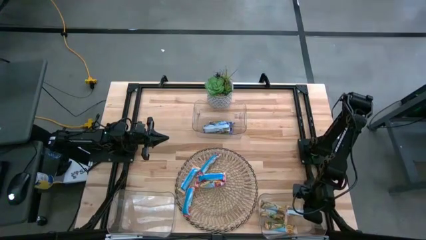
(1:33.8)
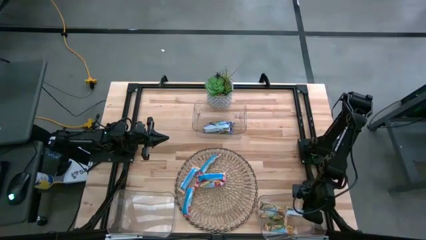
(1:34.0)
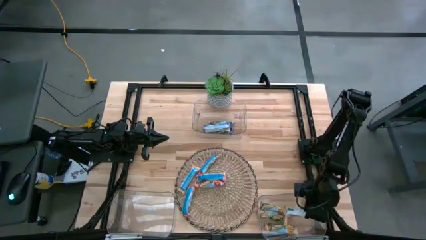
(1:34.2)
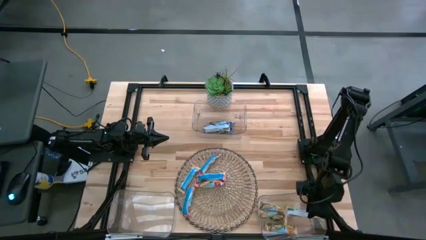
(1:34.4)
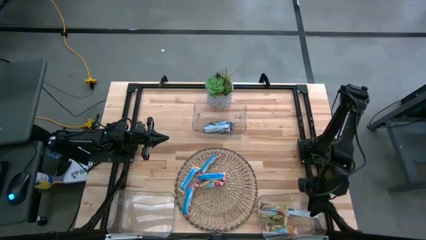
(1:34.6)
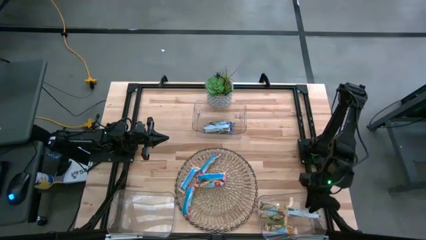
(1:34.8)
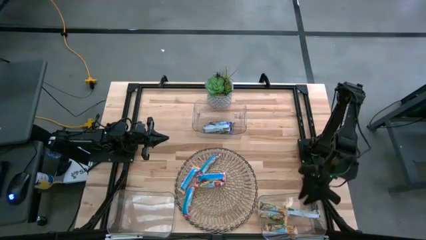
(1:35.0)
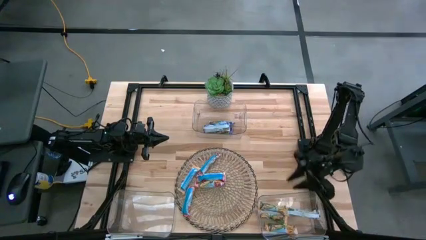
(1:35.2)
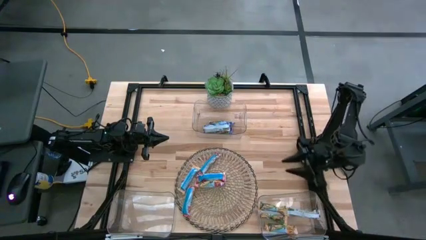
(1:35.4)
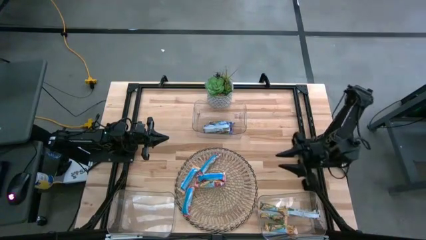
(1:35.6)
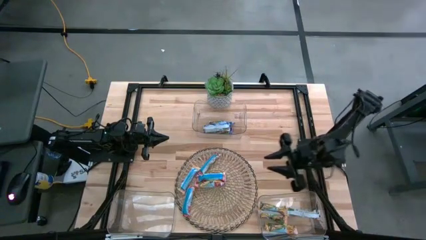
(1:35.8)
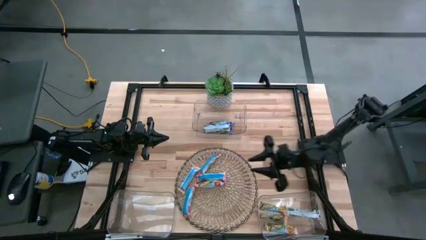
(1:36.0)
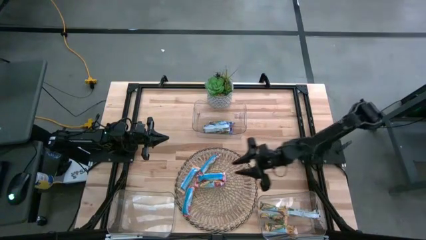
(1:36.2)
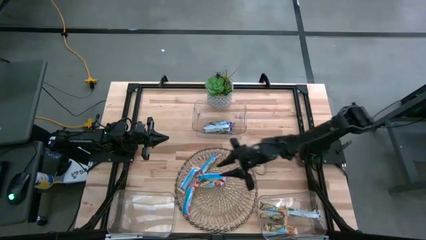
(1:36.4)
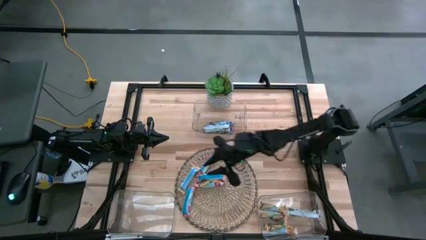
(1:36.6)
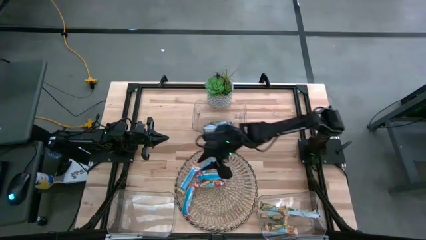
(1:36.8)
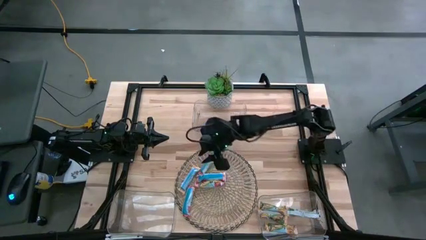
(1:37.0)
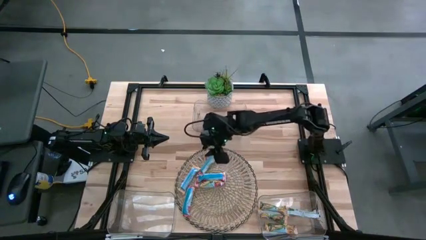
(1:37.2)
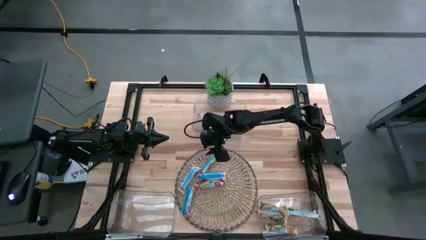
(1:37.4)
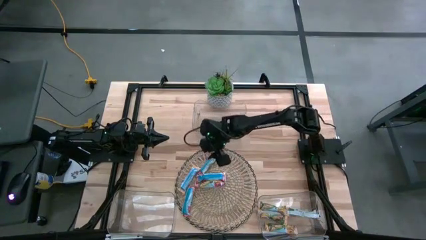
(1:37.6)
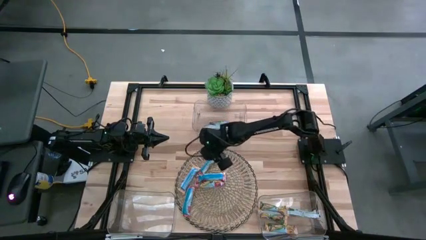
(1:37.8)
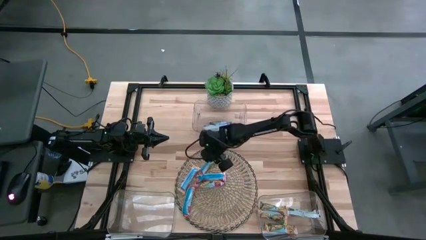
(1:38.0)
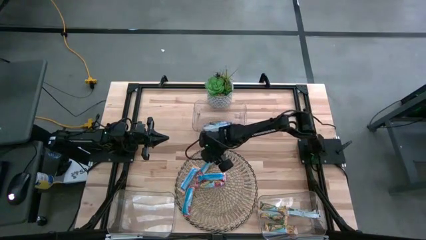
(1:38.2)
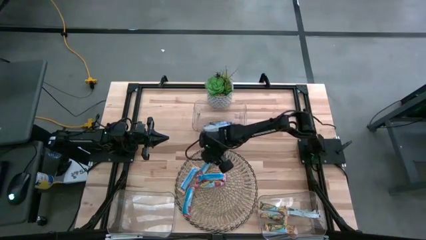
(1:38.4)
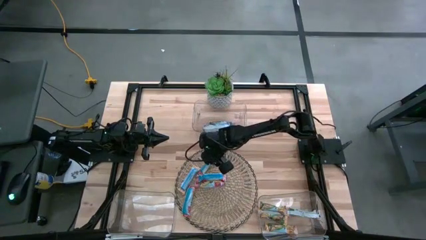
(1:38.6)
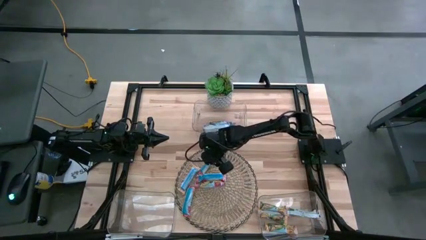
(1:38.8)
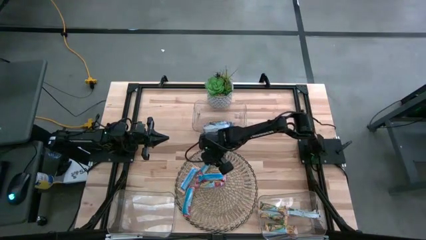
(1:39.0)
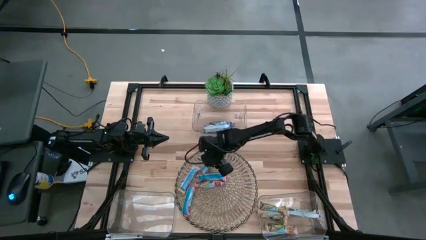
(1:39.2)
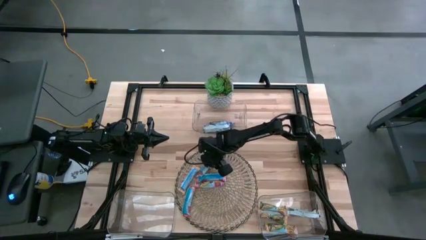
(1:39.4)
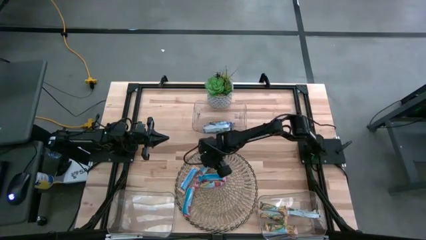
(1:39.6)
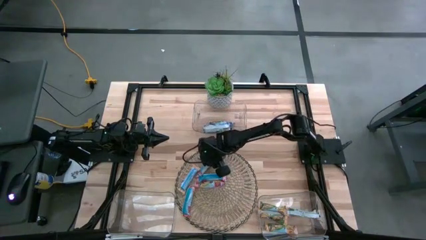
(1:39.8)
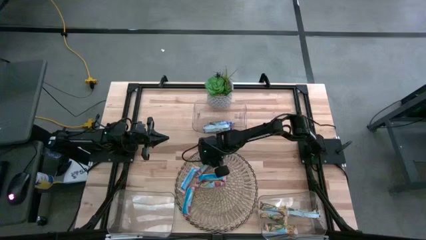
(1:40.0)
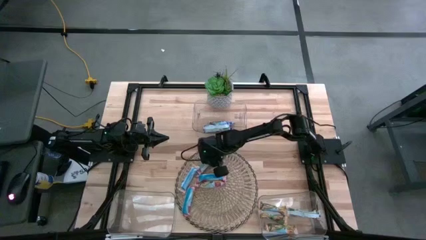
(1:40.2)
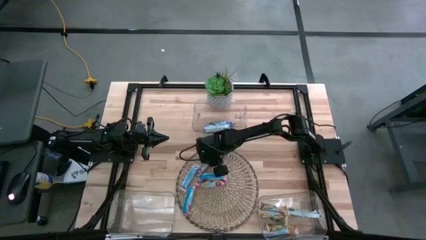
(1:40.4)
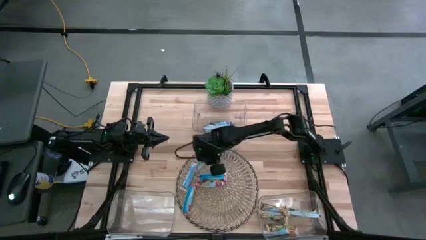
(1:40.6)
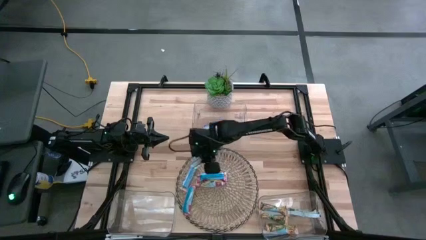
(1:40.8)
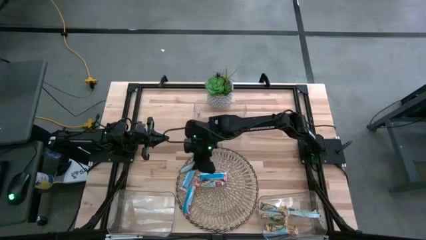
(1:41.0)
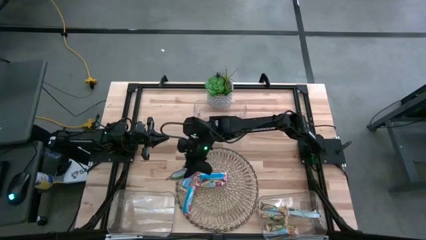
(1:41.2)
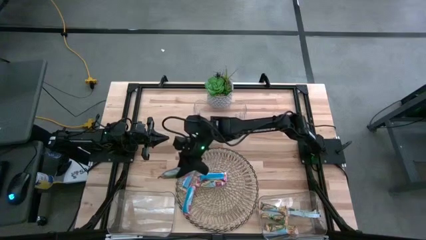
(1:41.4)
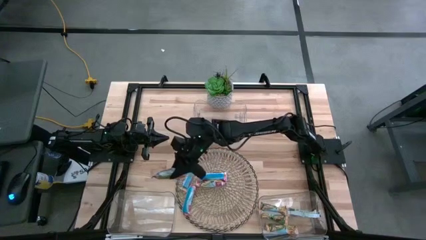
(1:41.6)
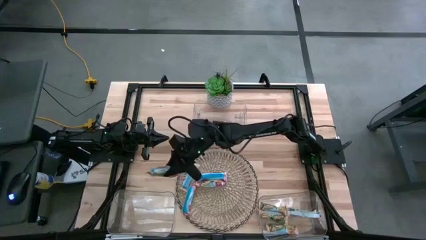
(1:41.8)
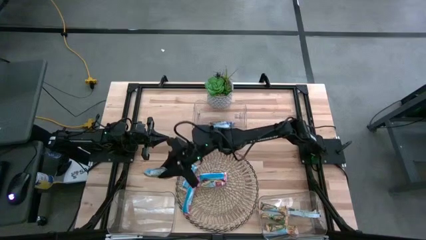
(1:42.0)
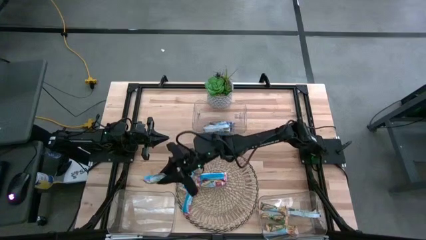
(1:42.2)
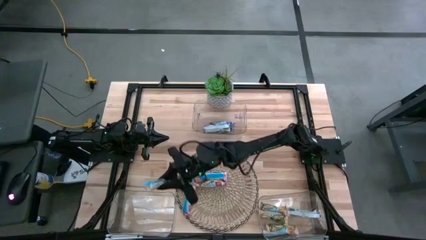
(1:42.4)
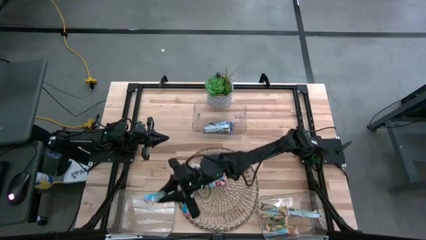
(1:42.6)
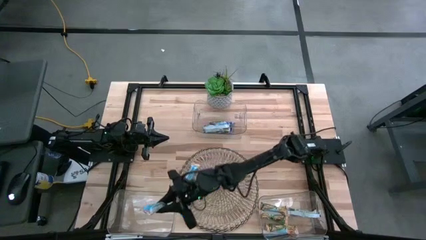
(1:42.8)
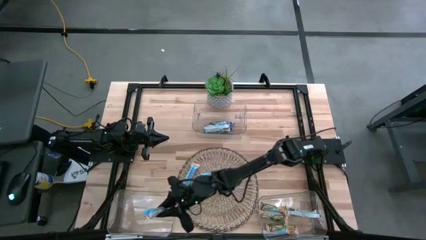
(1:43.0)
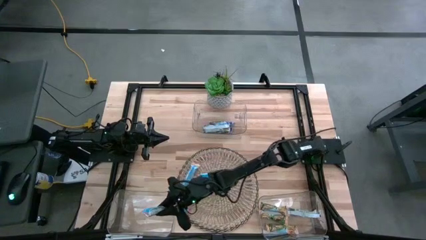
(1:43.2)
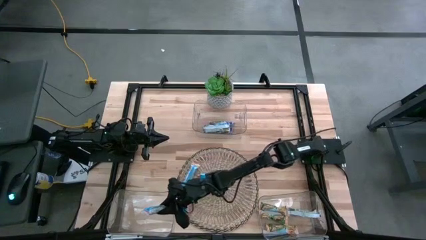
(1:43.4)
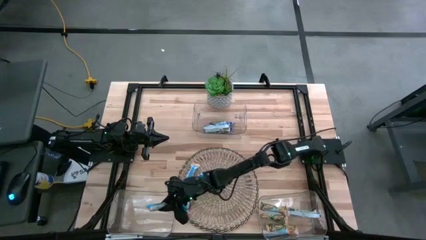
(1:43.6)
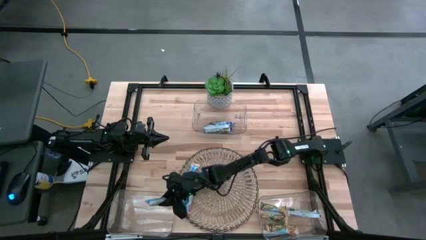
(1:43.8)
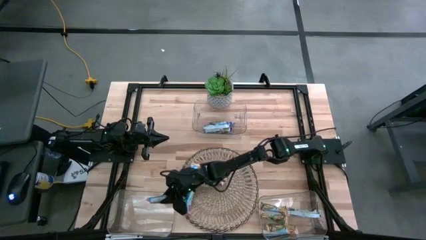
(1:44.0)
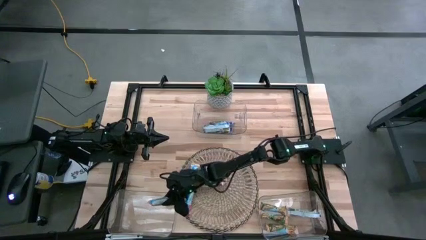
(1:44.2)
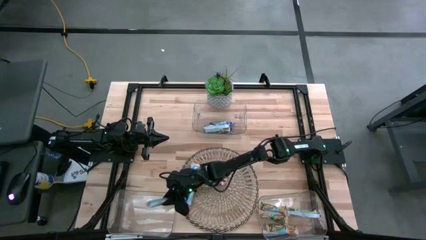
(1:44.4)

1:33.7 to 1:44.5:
Task: Pick and place Granola Bars by type
Put the red granola bar into the bottom left transparent bin

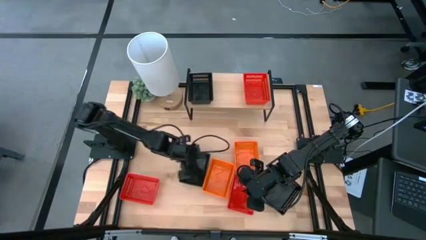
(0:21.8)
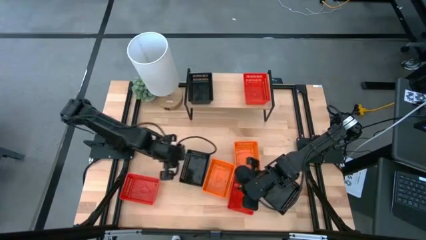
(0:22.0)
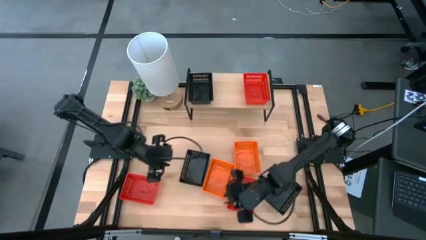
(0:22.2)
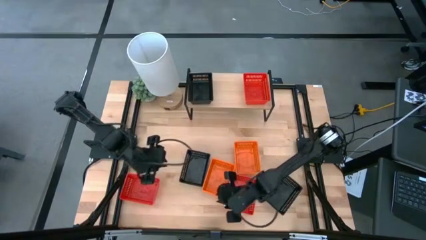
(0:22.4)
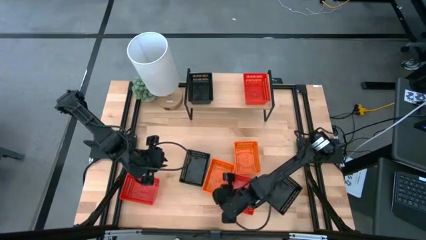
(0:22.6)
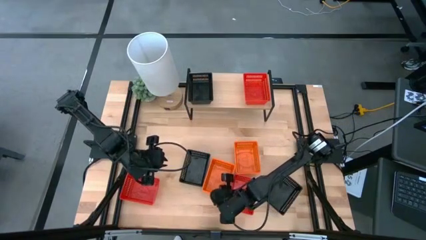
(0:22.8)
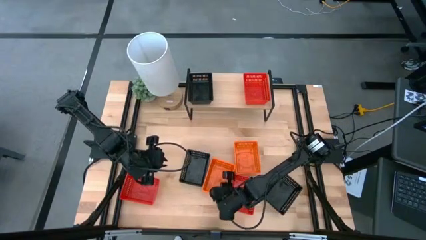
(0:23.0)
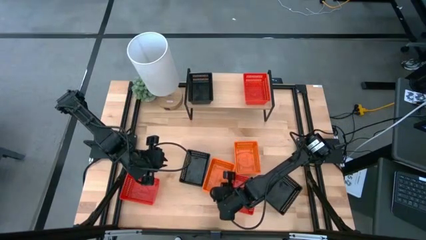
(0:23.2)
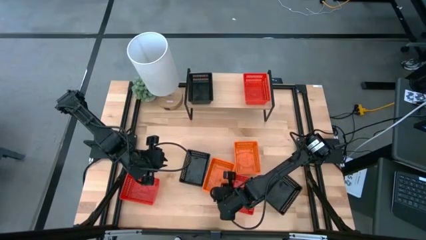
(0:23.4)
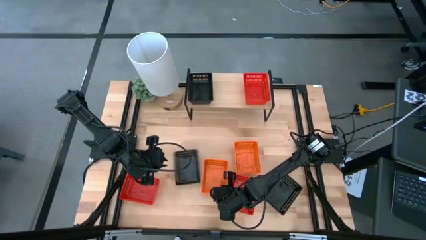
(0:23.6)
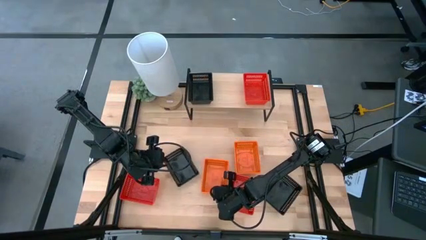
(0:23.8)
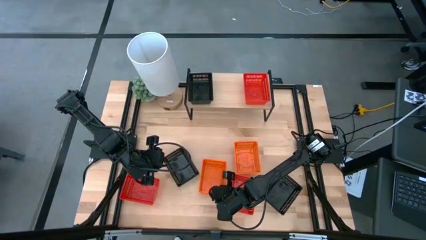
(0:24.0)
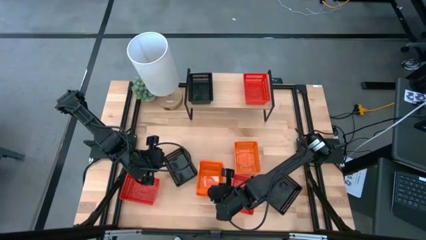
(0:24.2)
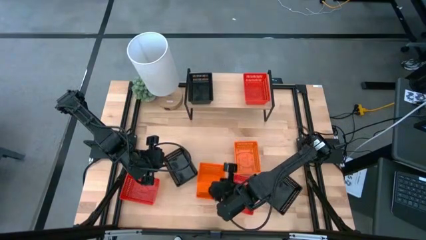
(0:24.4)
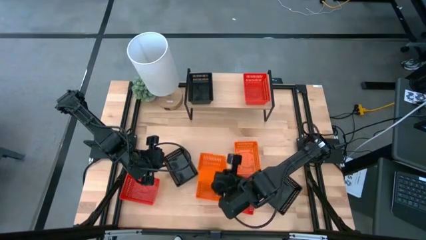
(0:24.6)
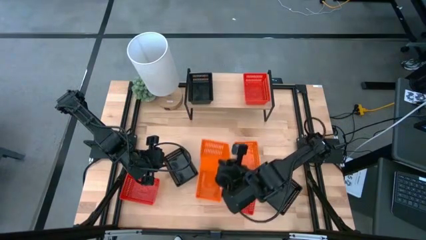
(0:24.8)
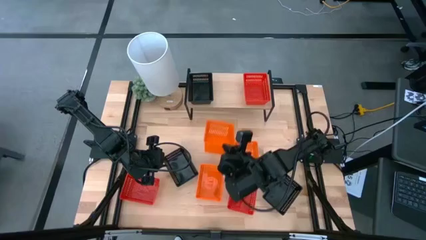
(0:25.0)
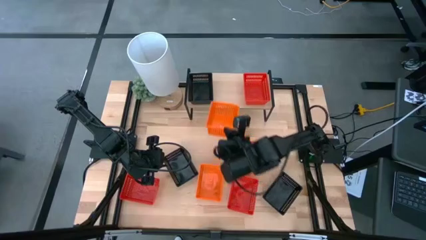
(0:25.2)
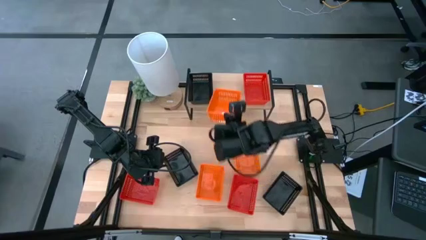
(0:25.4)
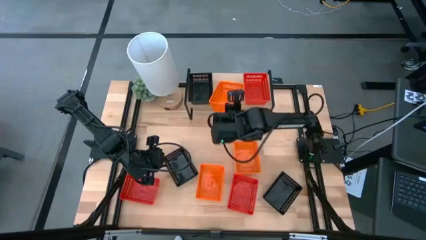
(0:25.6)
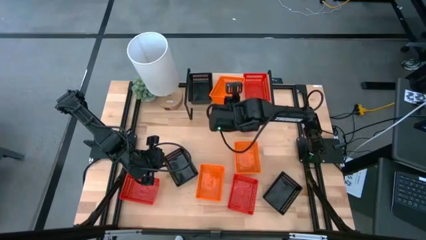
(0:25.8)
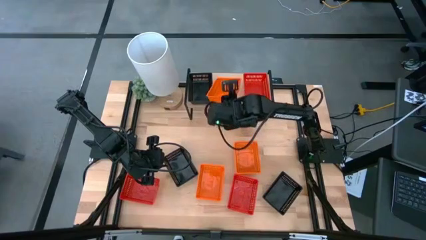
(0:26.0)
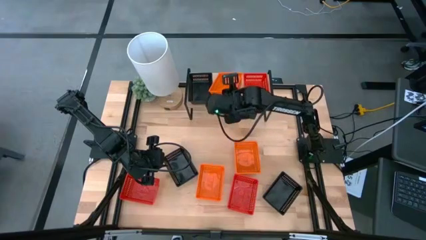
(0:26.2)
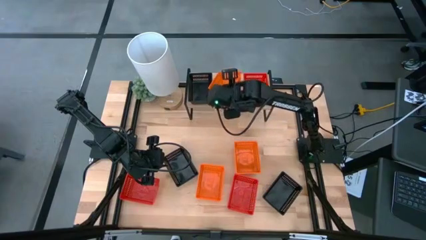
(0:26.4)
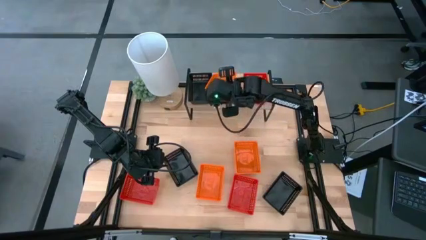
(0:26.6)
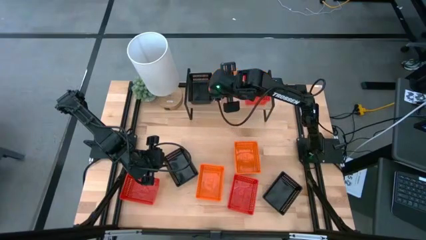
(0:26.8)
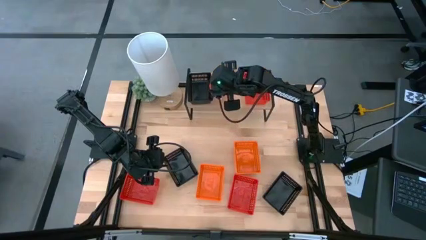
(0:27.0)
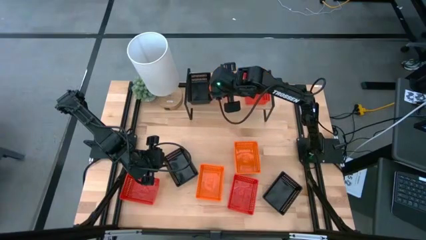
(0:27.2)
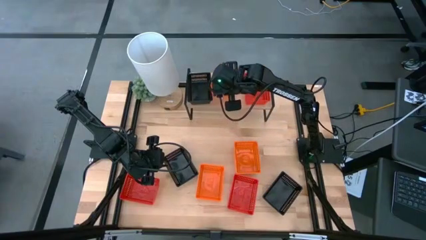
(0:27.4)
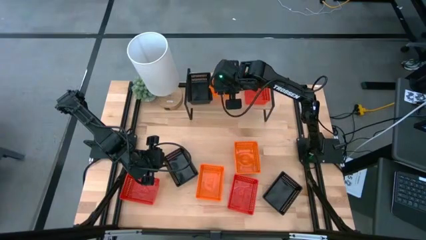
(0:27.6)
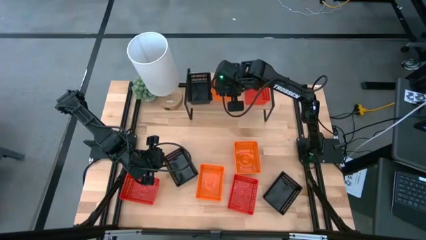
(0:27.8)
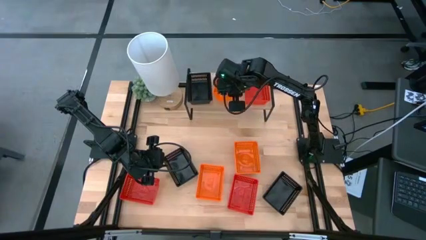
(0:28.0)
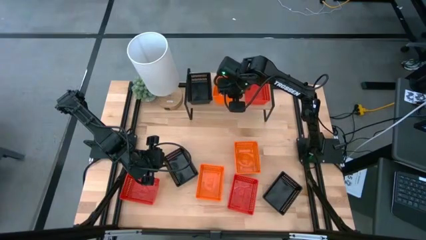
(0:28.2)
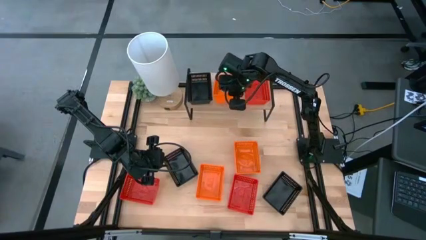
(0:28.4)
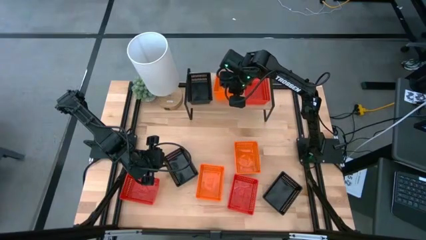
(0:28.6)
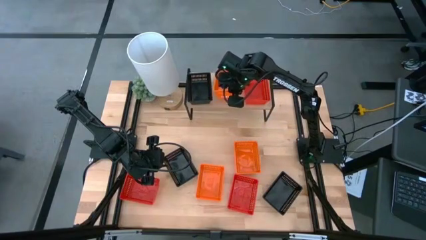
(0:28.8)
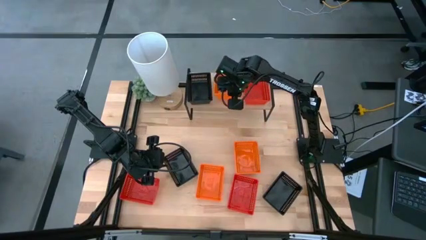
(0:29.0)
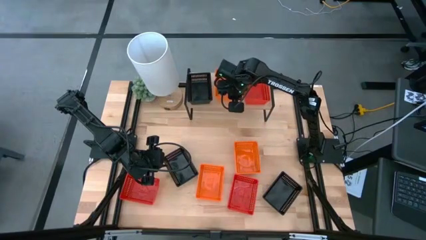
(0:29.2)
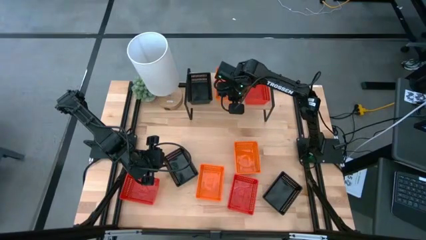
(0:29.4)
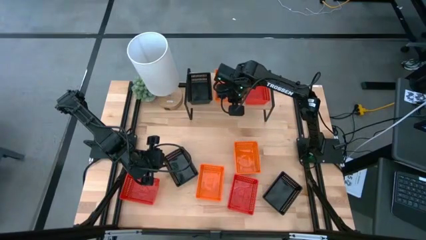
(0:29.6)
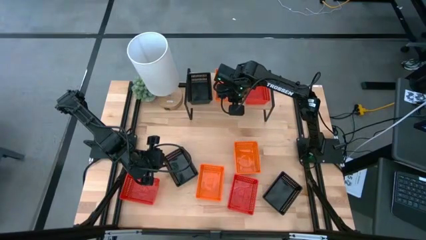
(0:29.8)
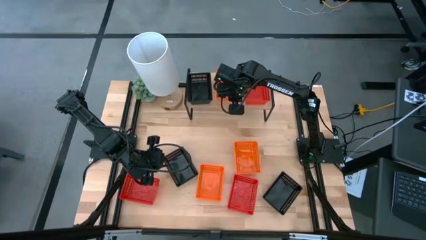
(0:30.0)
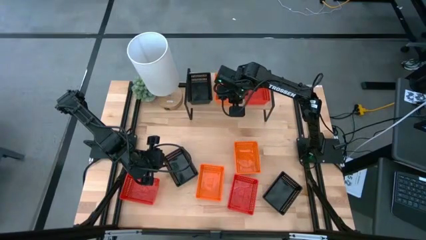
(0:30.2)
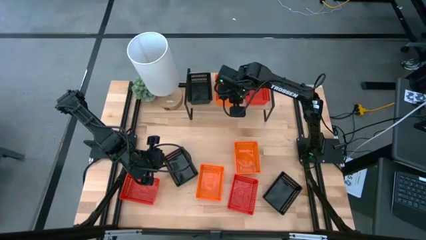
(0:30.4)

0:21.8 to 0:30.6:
Task: Stack baskets on shelf by color
Put the bottom orange bin on the shelf
